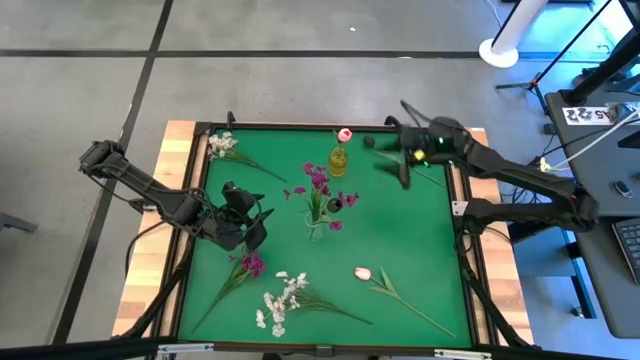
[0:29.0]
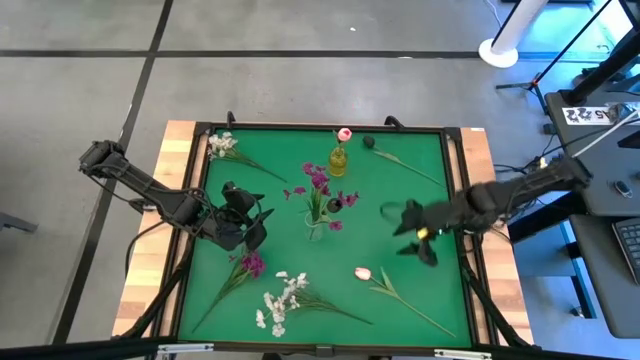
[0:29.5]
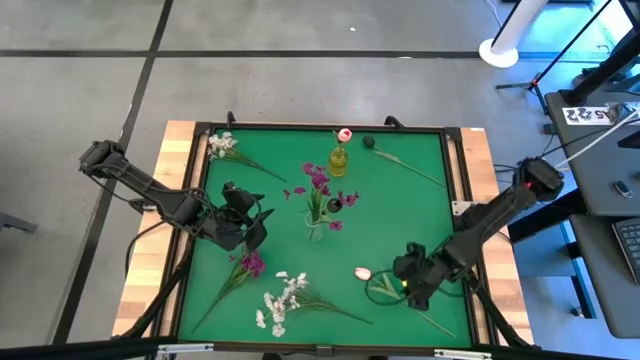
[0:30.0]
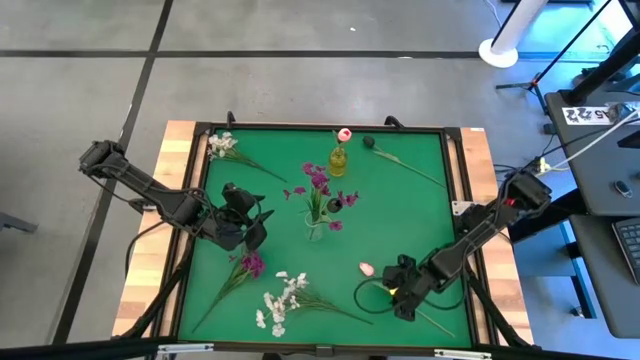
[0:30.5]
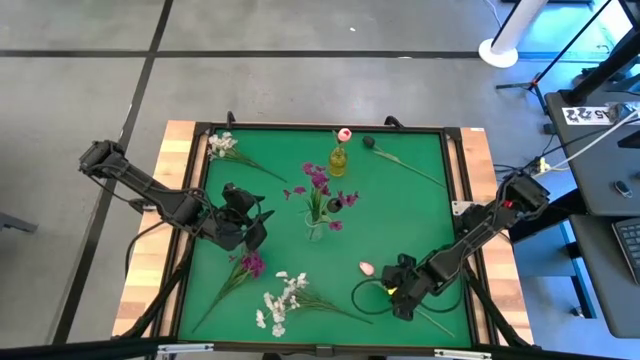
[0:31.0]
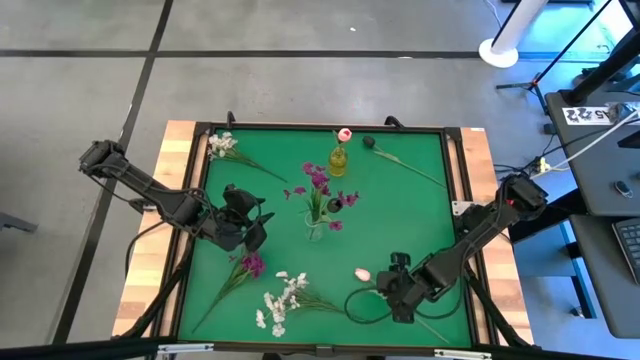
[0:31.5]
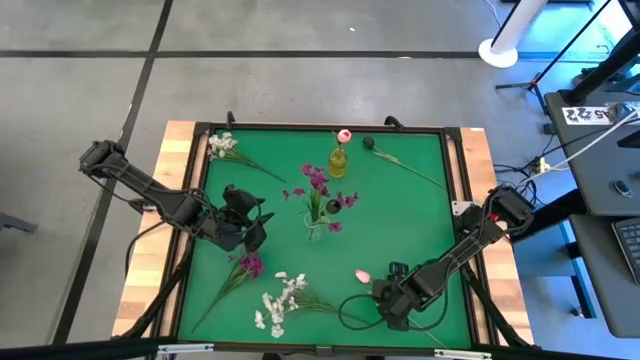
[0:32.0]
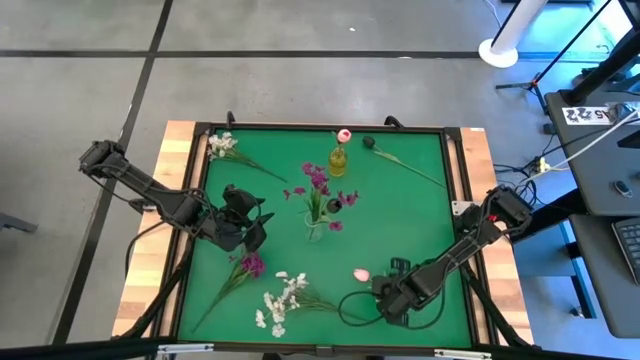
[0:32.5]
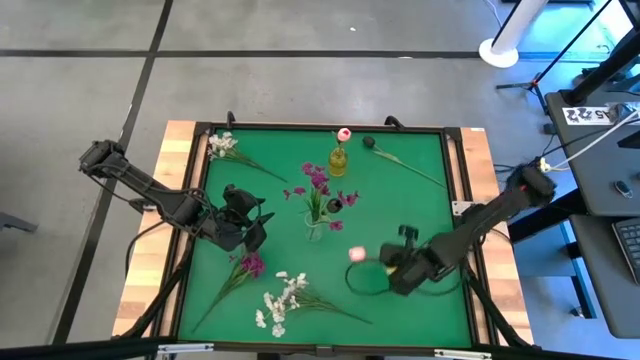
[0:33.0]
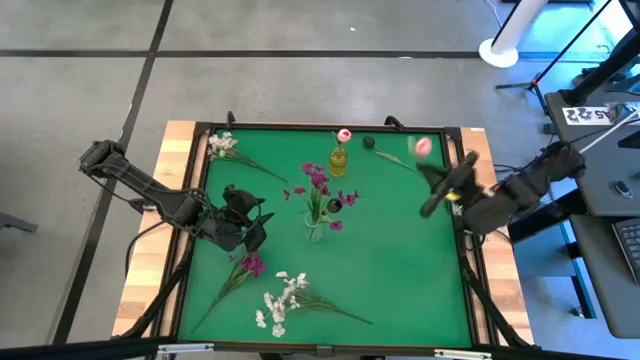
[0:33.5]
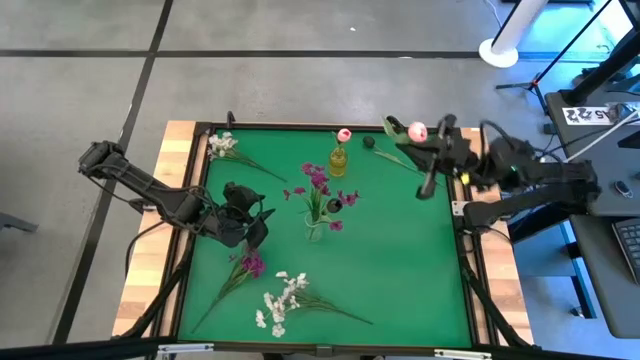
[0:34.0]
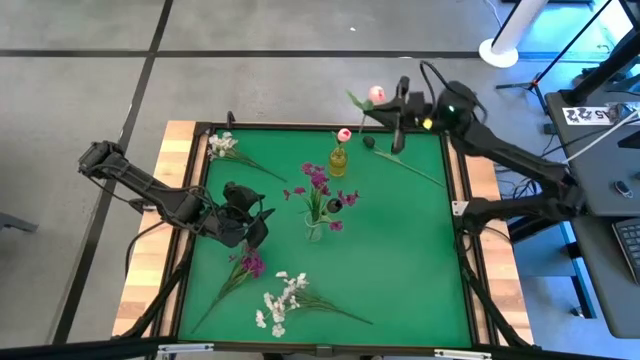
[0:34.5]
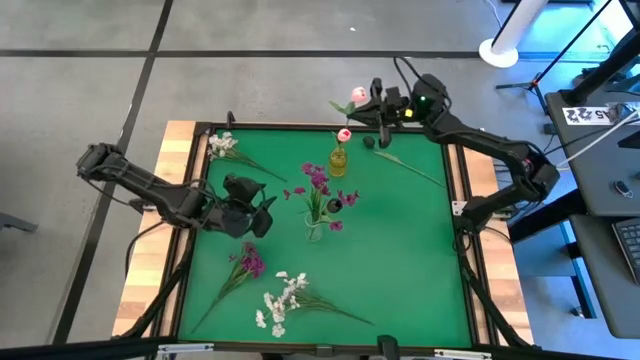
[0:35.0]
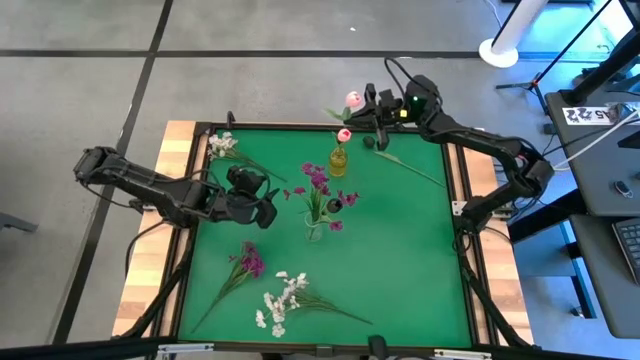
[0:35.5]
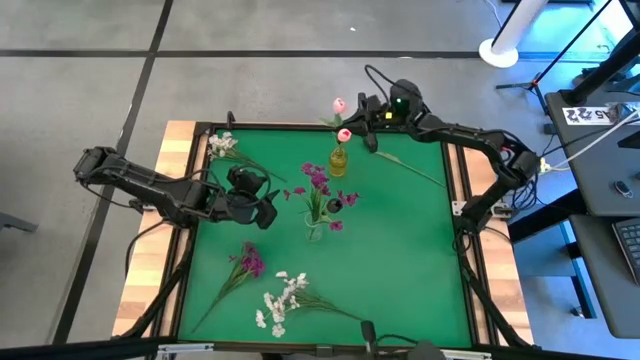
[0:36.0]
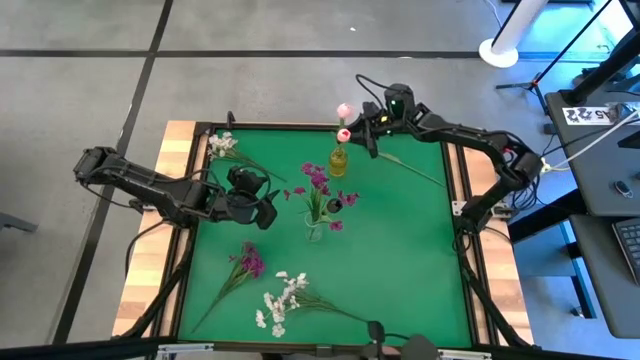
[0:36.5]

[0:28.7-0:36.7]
Task: Sort flowers into vase by color
Put the pink flower into the yellow vase

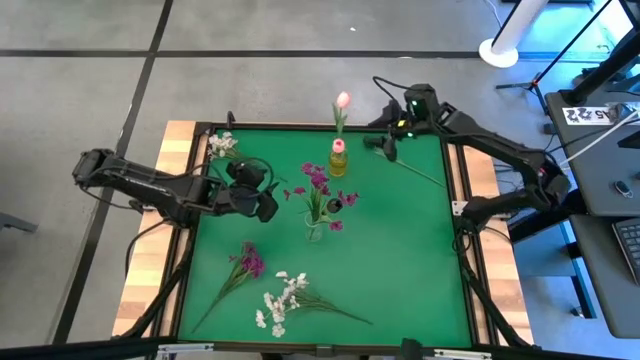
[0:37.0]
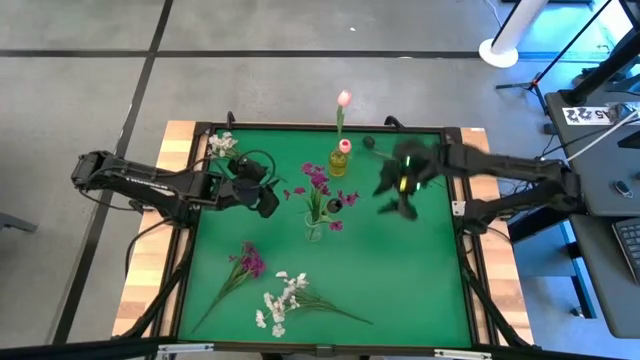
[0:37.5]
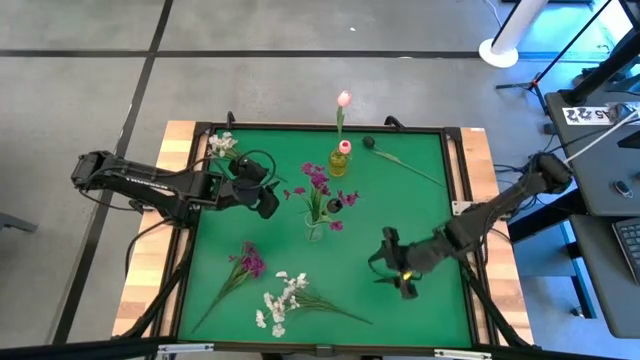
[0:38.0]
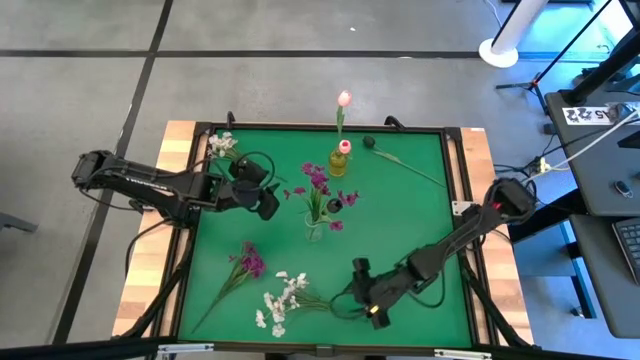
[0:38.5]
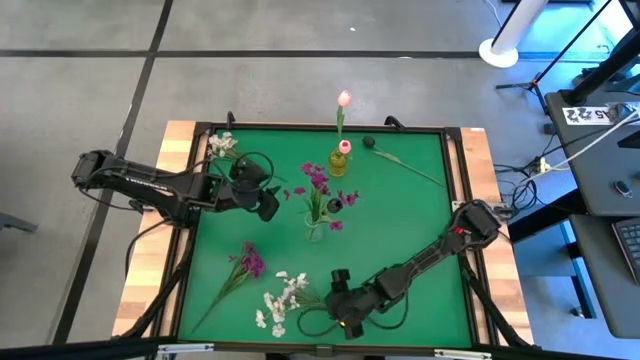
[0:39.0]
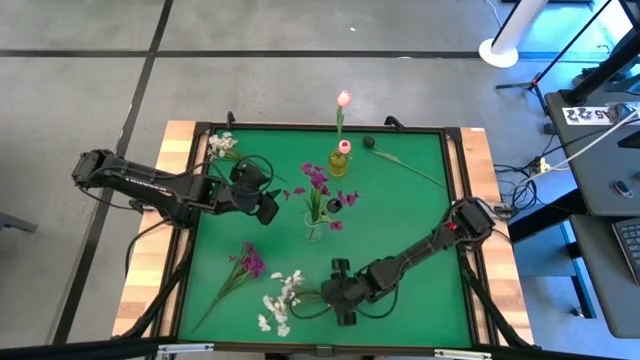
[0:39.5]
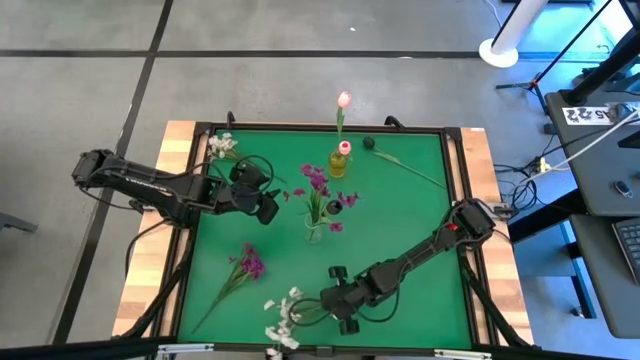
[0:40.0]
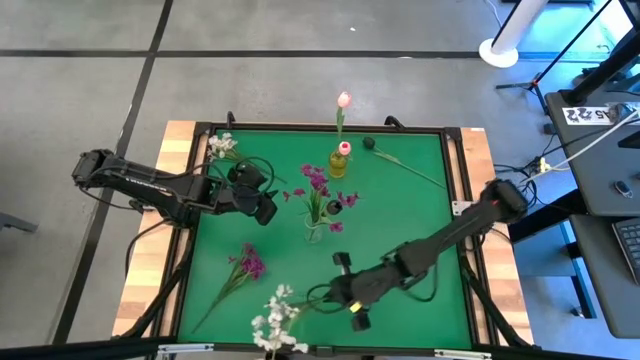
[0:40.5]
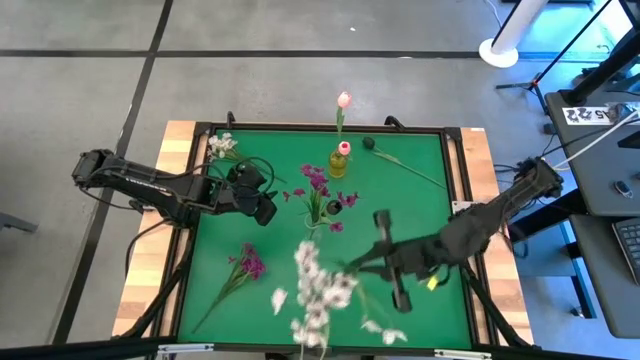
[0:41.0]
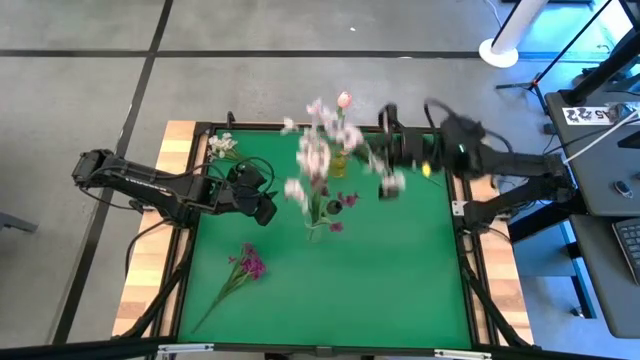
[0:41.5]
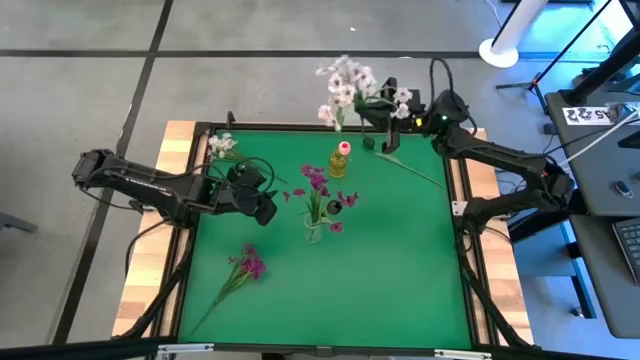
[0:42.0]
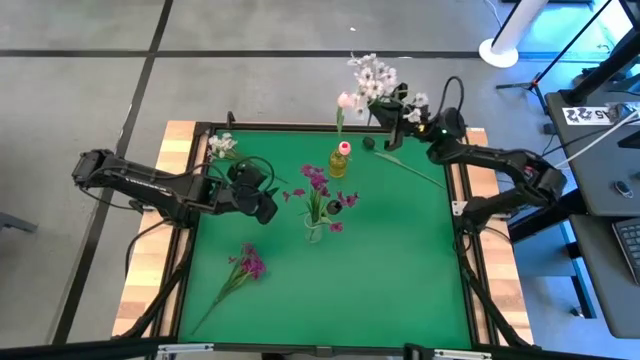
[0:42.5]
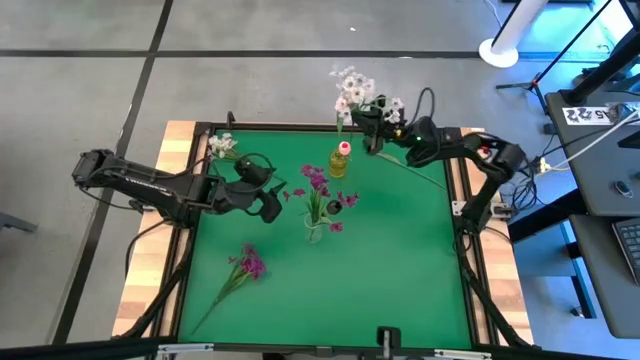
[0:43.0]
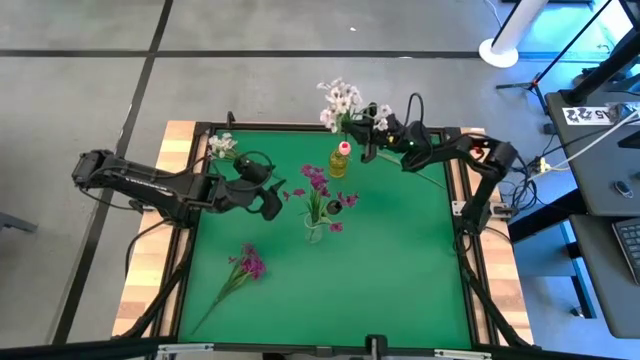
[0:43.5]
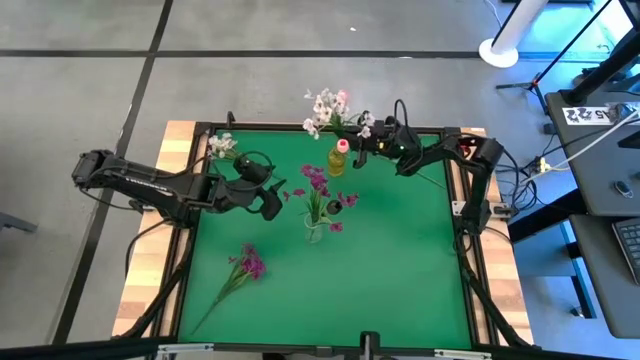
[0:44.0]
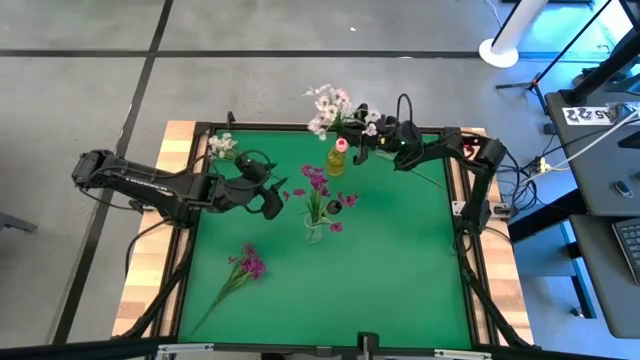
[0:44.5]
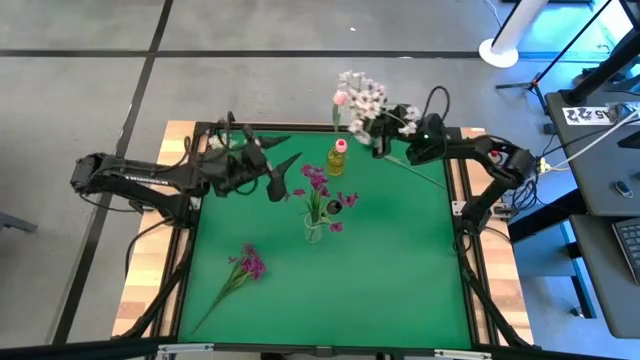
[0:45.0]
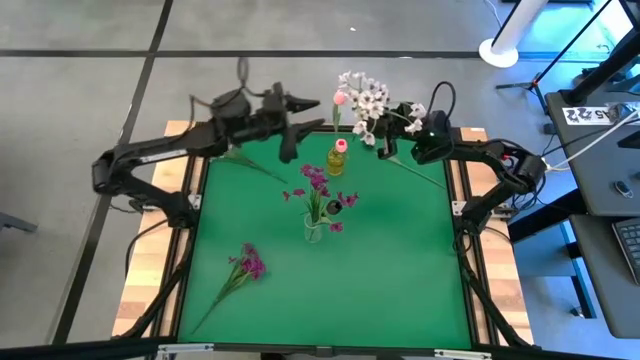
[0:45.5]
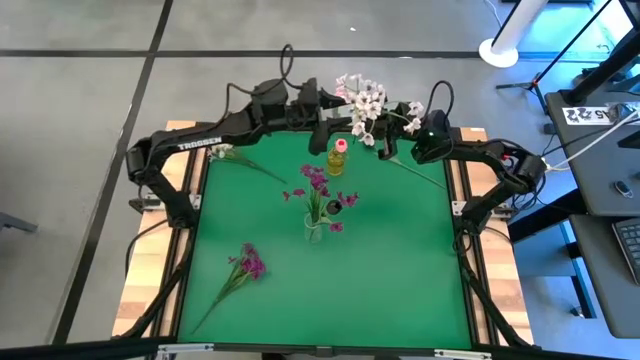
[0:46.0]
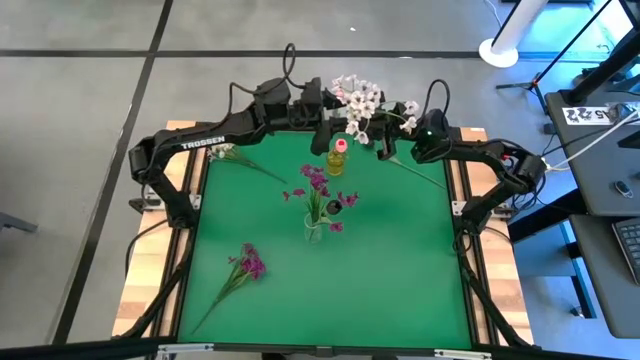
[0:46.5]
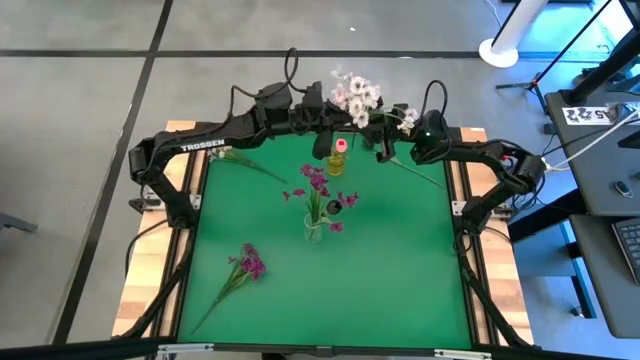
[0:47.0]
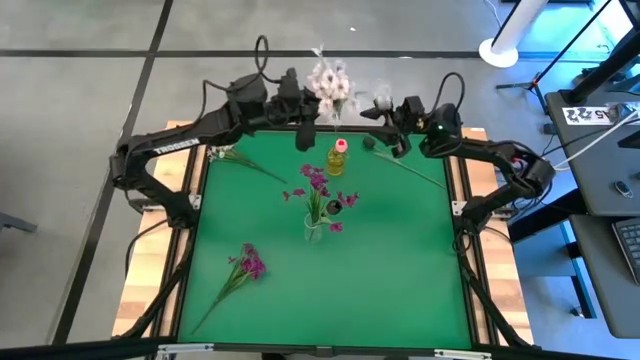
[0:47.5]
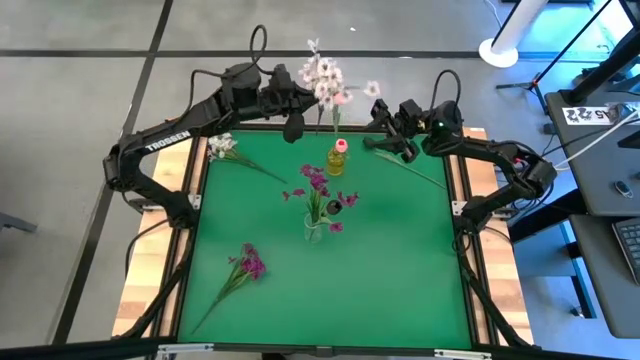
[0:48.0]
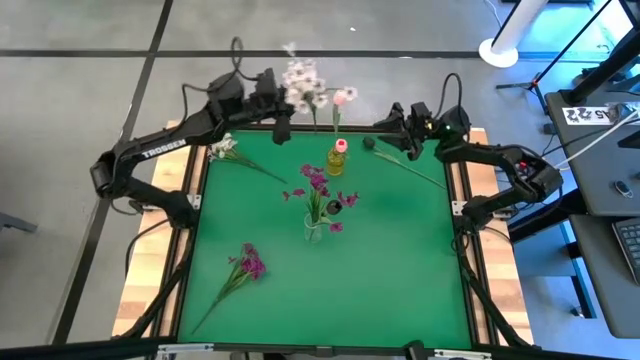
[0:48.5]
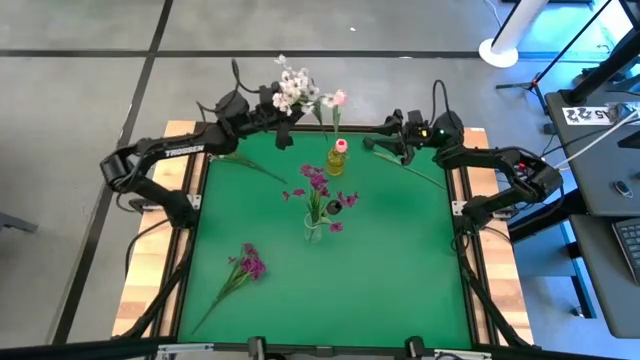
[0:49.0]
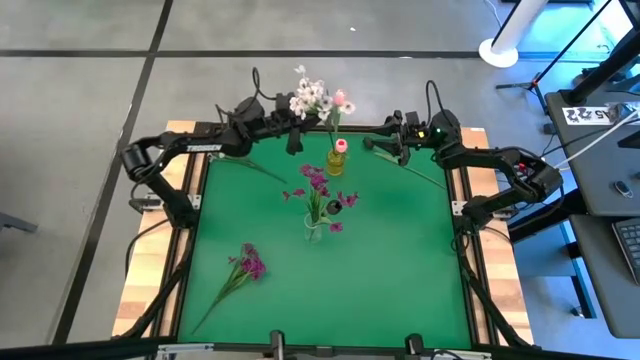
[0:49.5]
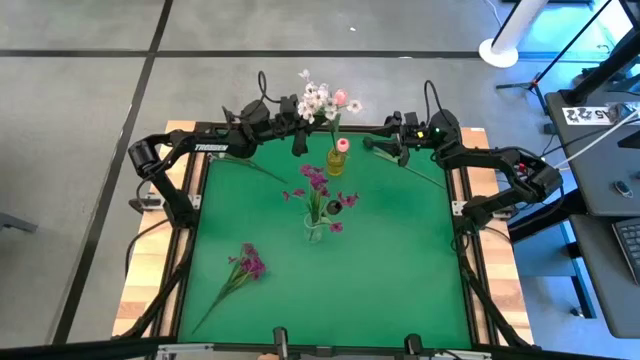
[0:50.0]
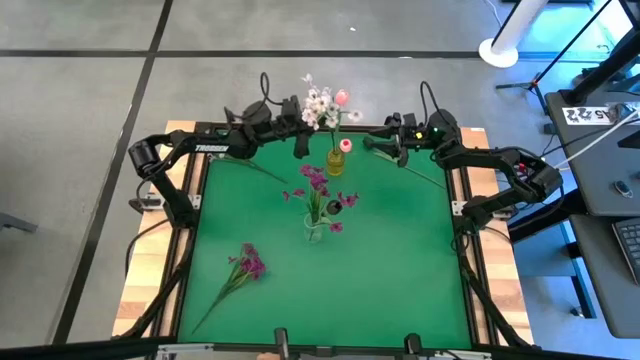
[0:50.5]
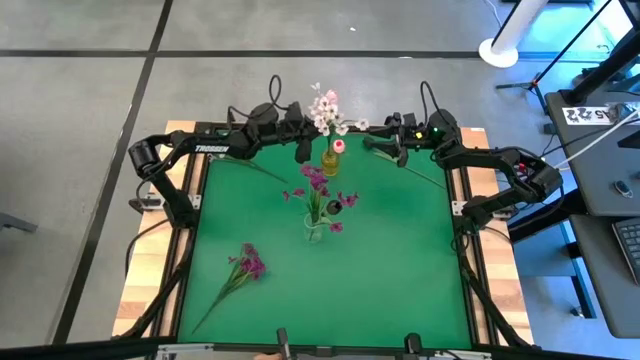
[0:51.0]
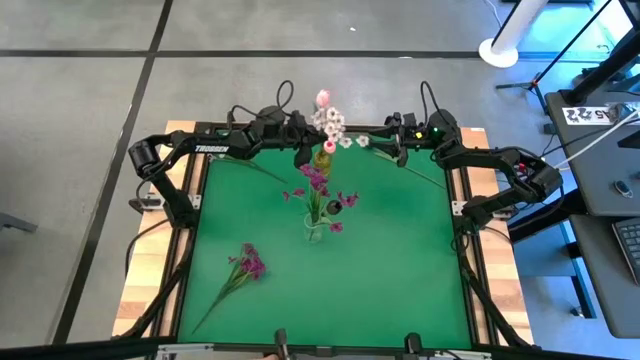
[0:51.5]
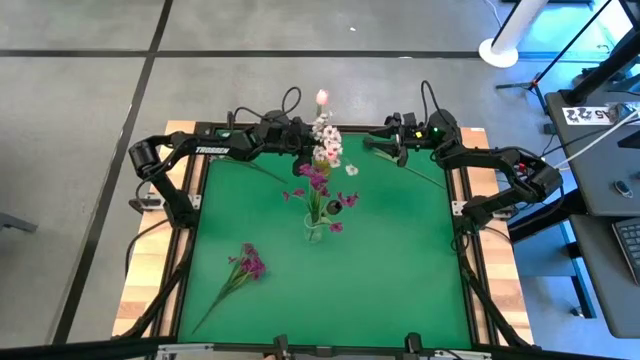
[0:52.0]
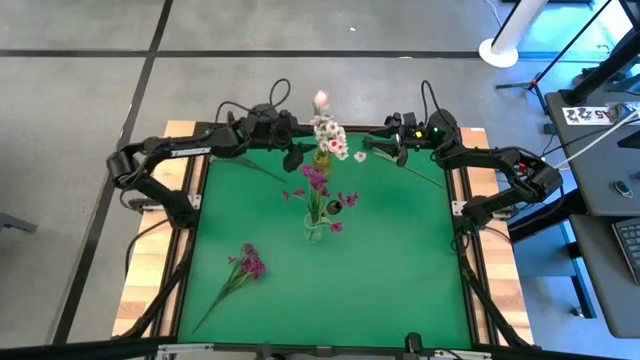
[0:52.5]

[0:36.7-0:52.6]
Put the bottom white flowers into the yellow vase
